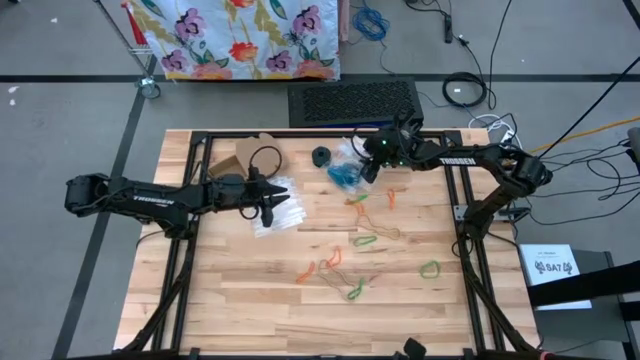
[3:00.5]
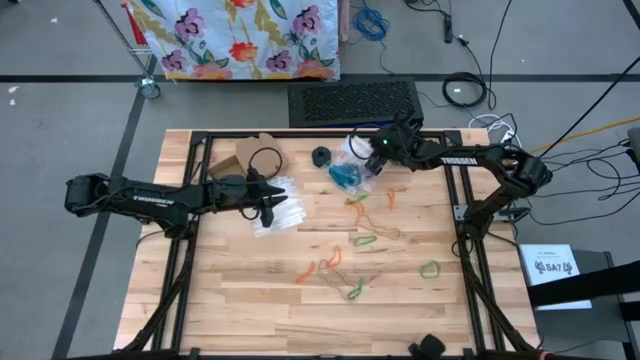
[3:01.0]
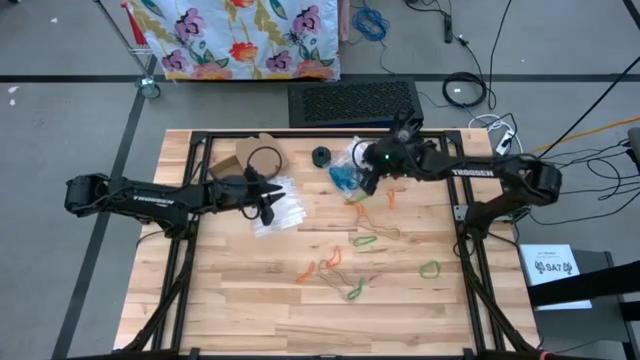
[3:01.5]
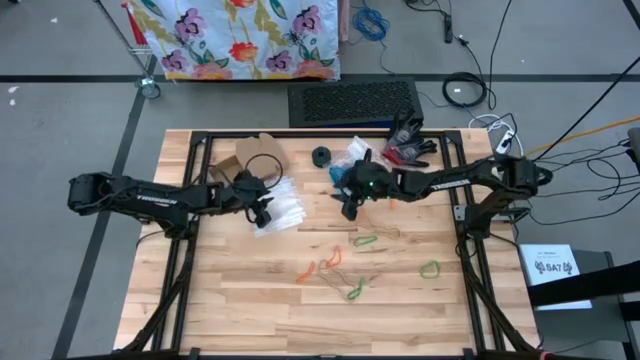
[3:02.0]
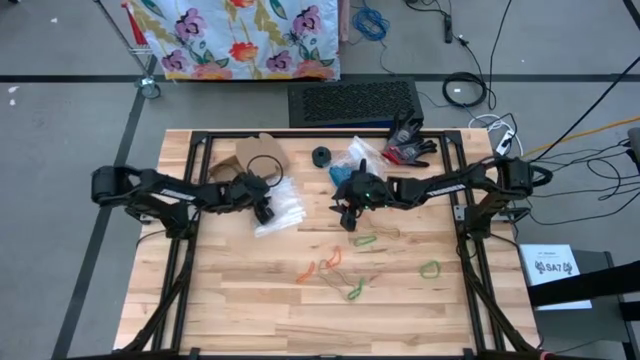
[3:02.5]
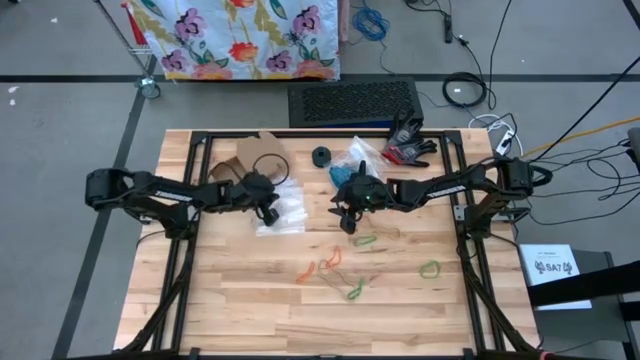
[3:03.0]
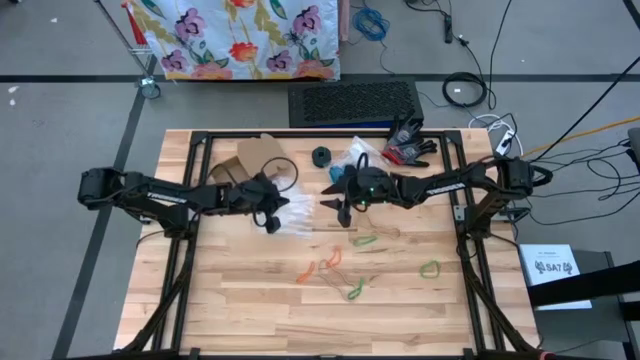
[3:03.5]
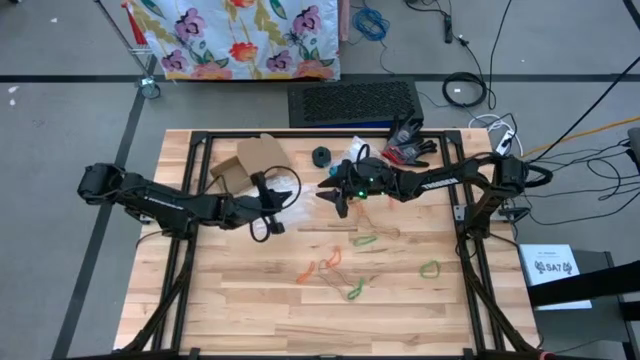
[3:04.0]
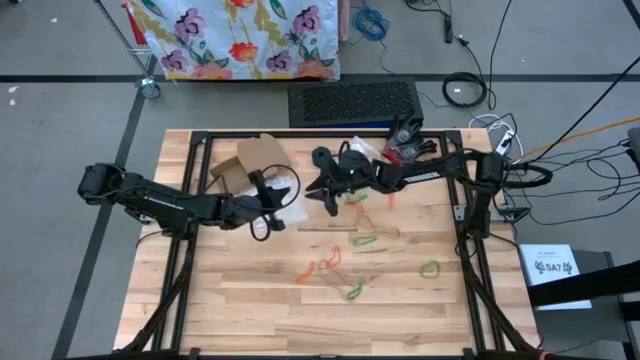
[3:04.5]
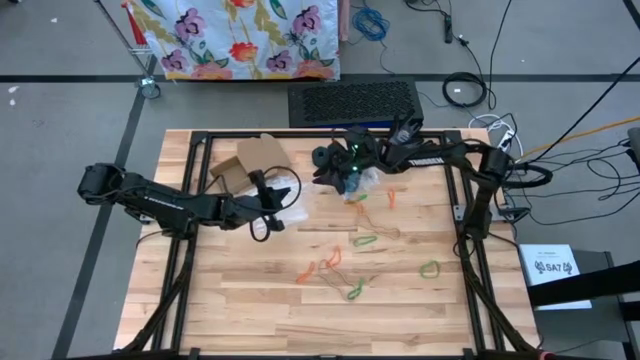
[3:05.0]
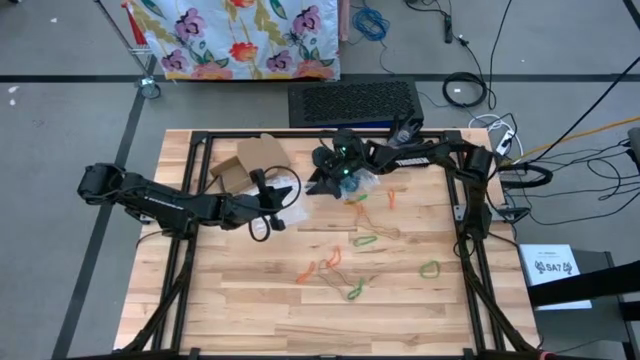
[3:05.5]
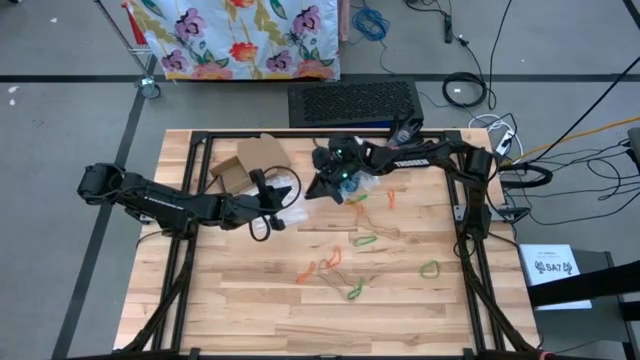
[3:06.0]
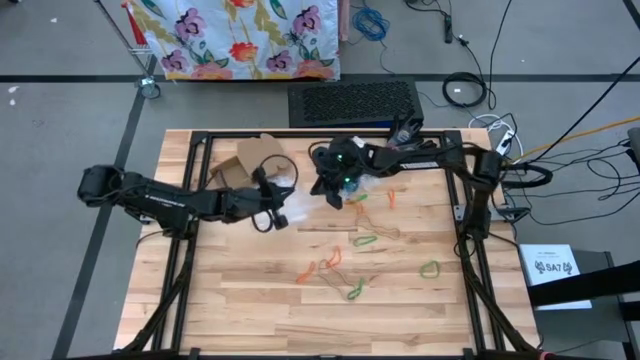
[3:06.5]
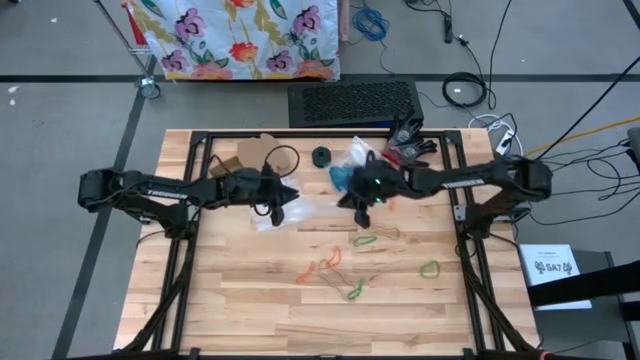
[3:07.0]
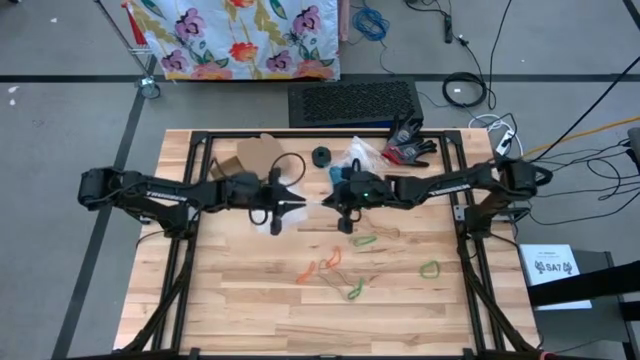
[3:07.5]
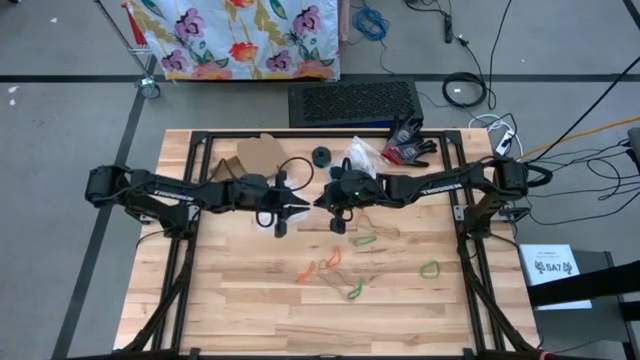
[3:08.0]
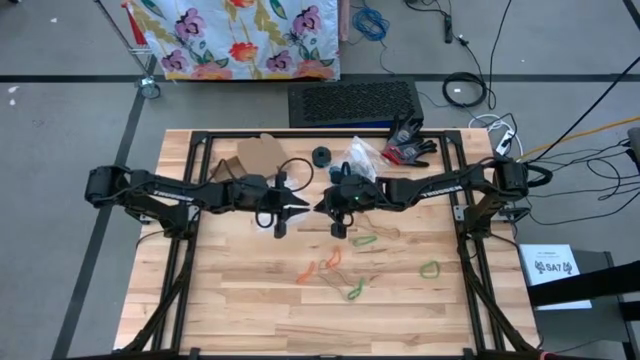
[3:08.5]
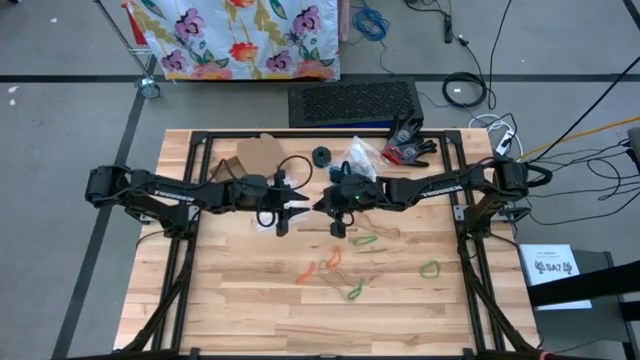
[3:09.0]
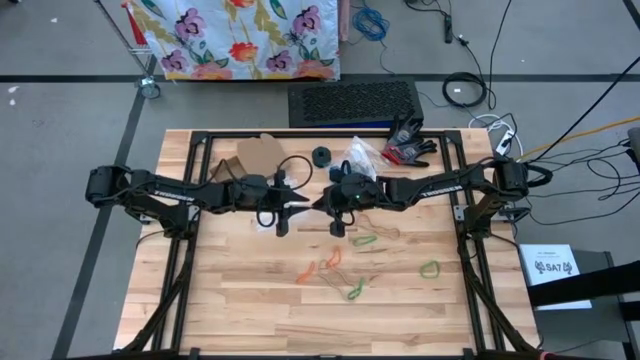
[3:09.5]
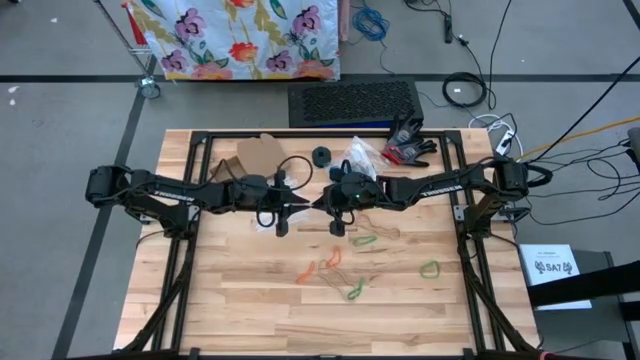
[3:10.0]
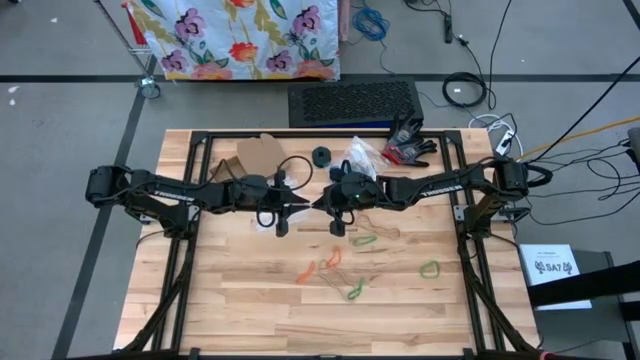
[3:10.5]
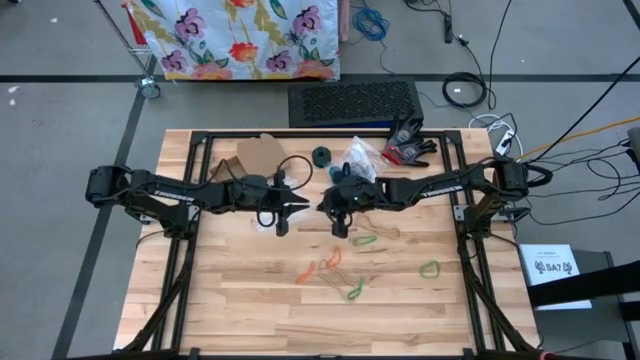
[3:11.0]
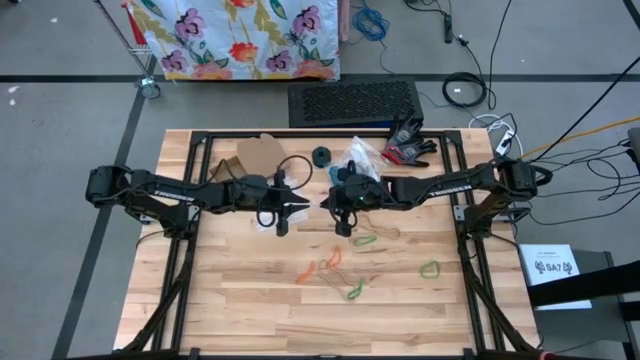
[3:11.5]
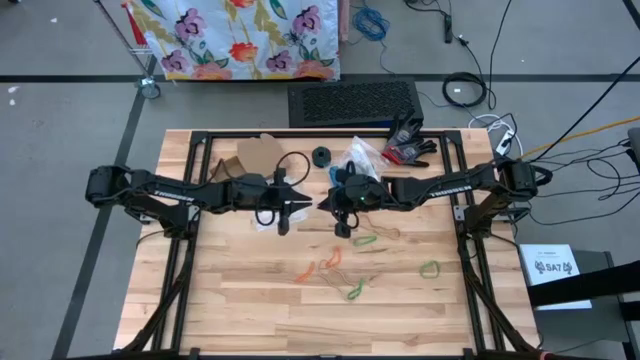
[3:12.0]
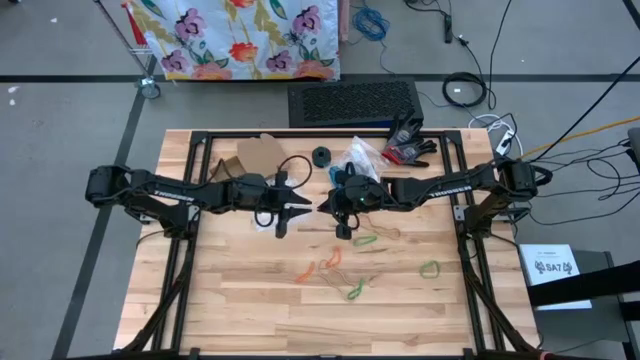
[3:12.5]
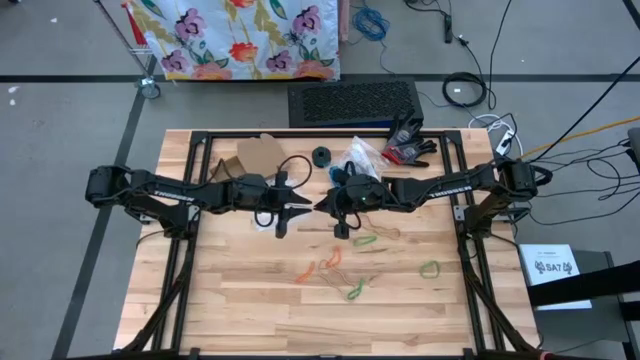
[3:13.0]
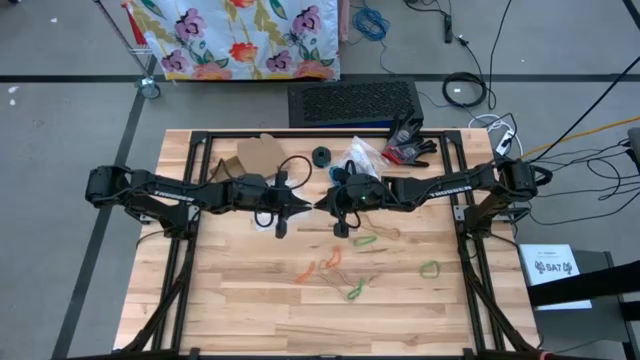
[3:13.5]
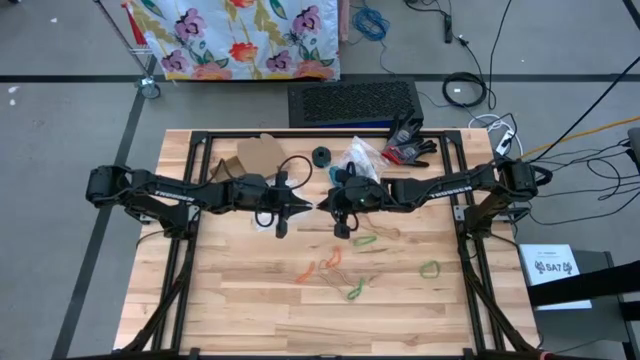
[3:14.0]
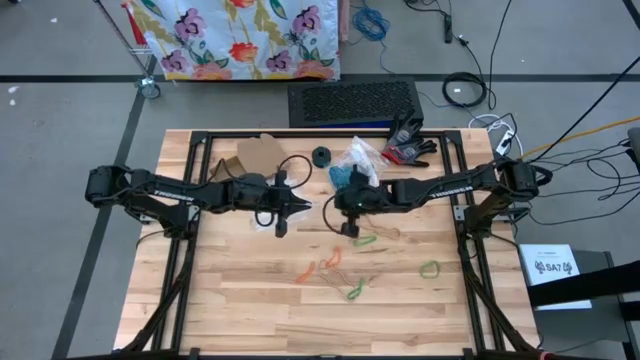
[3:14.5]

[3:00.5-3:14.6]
Task: Sort rubber bands
Open the transparent zip bag

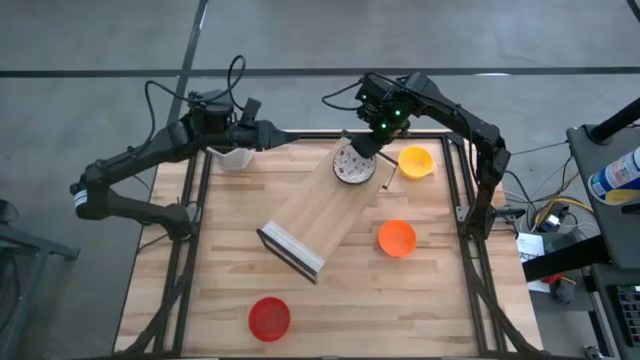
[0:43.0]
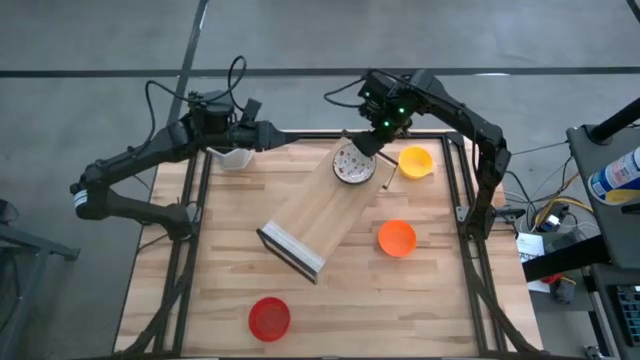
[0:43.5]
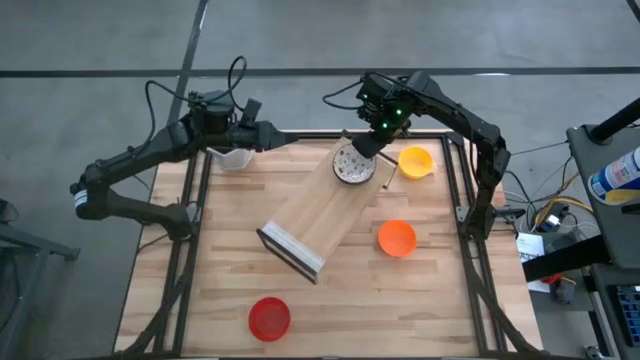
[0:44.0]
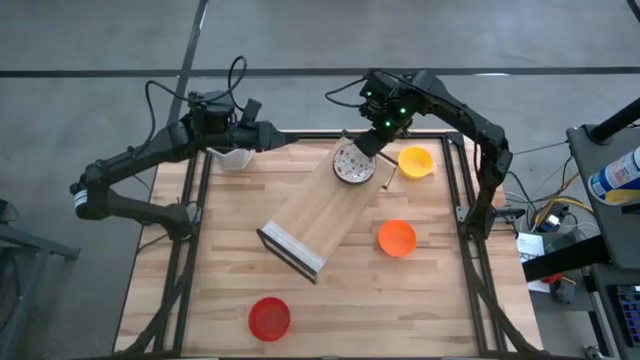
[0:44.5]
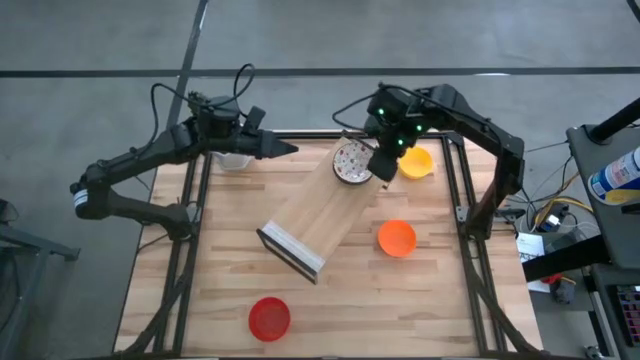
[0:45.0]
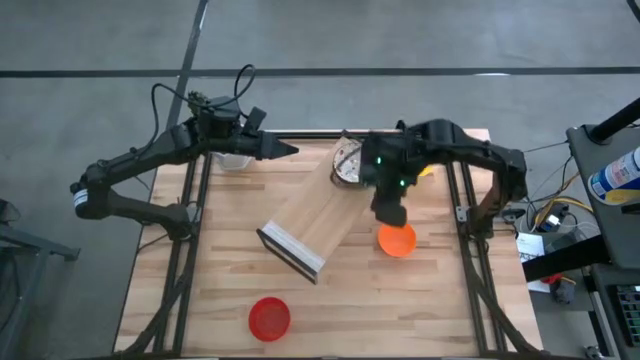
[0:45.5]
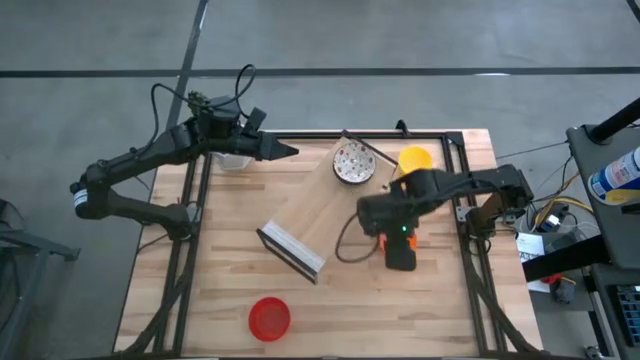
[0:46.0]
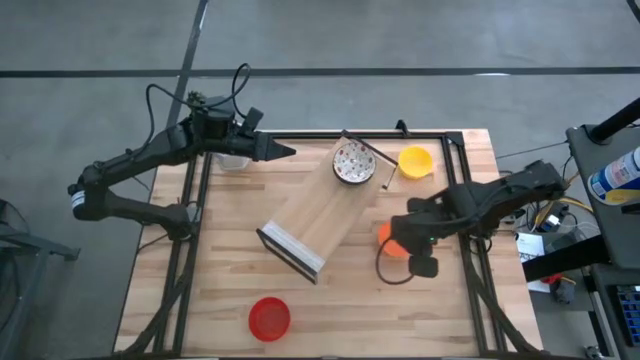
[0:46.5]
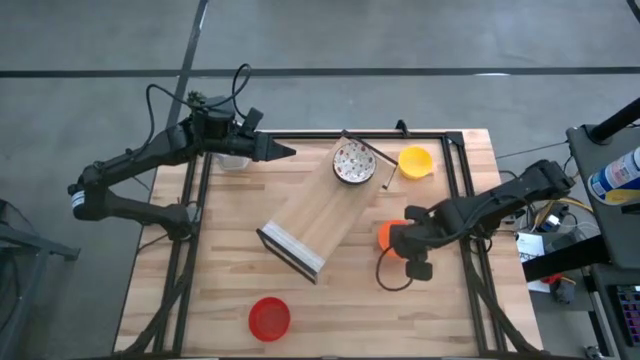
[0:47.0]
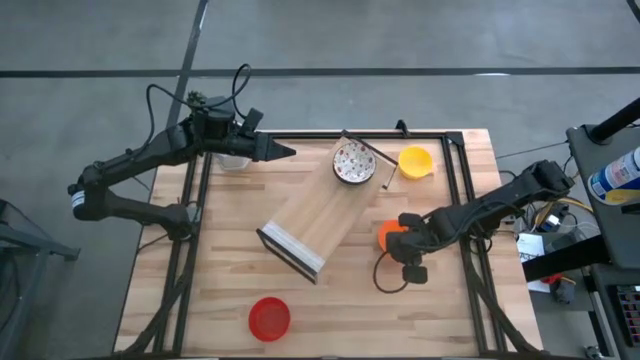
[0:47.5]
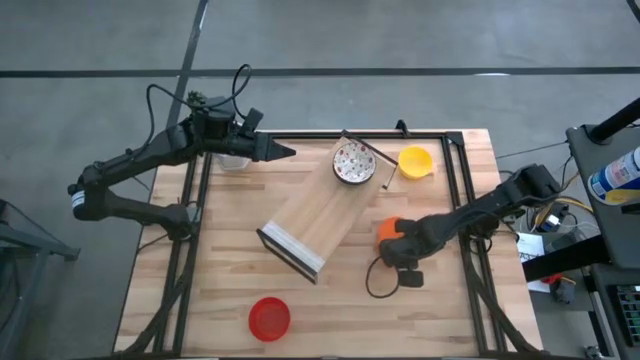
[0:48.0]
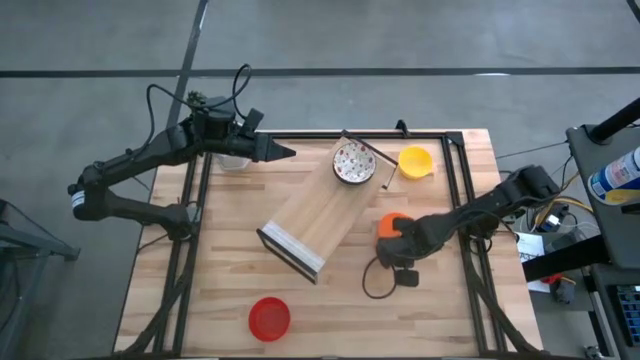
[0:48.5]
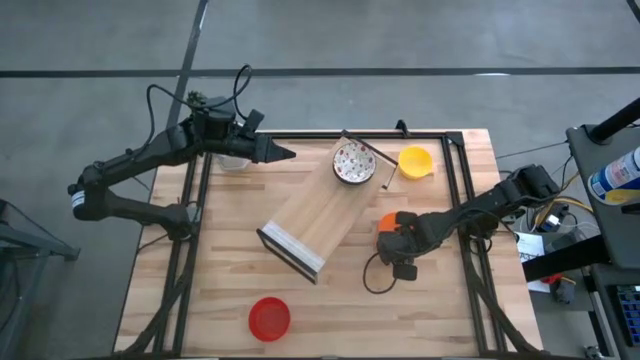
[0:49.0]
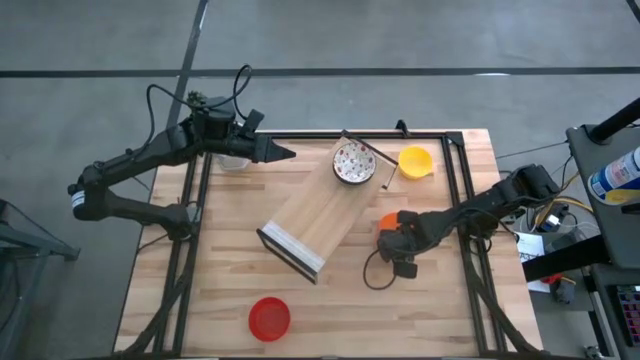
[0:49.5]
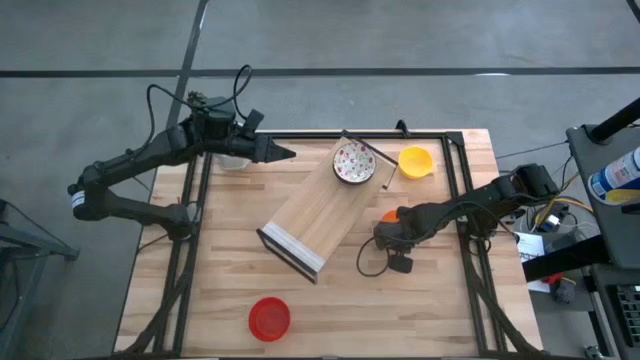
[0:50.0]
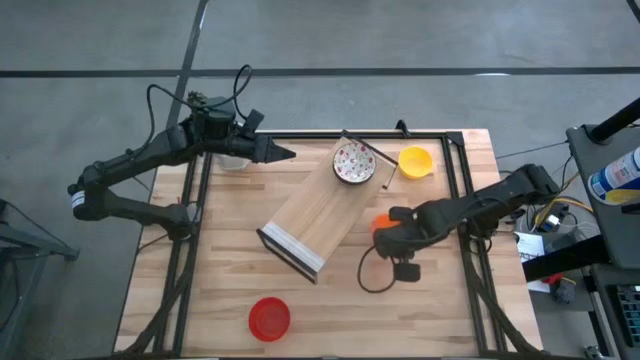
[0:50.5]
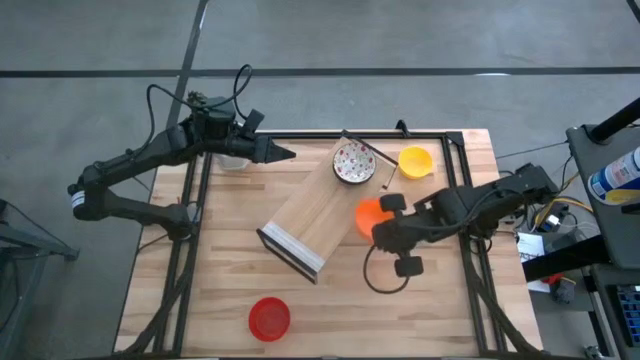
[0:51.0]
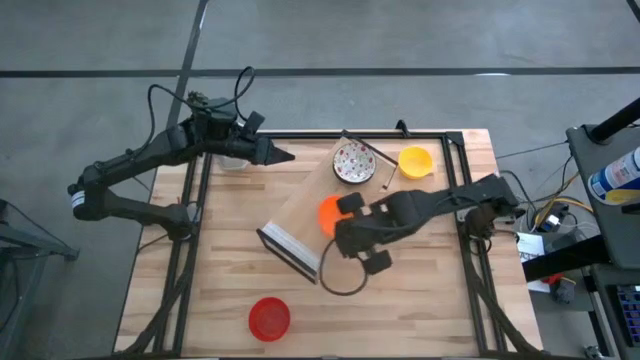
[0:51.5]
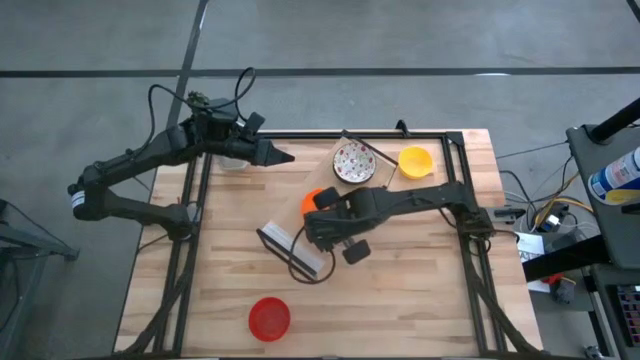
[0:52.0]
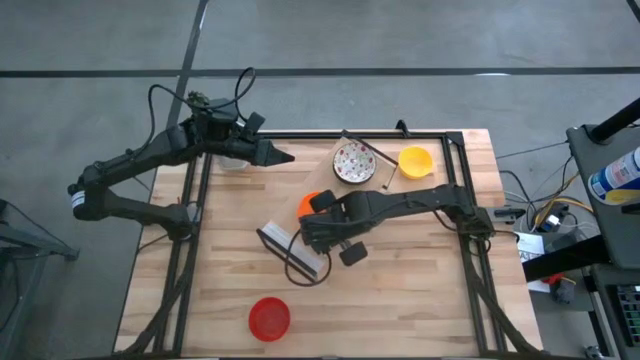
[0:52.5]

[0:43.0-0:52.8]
Task: Pick & Place Mini bowls
Put the orange bowl on the shelf
